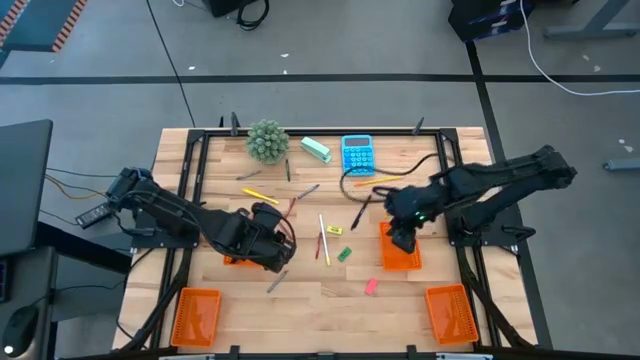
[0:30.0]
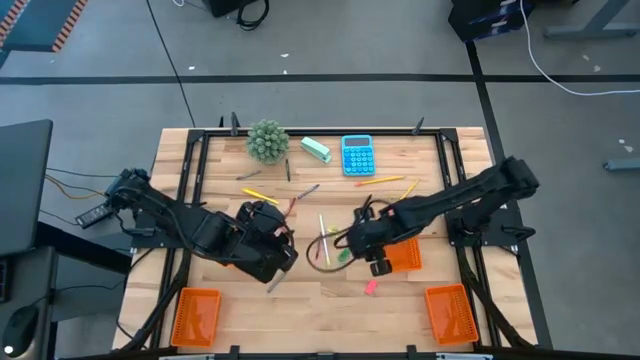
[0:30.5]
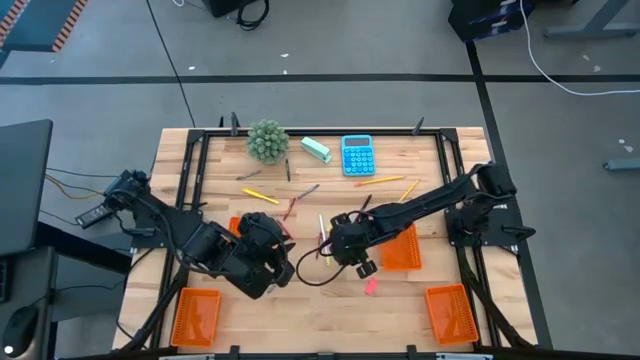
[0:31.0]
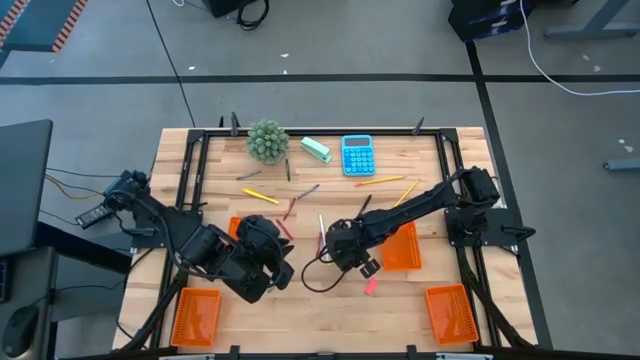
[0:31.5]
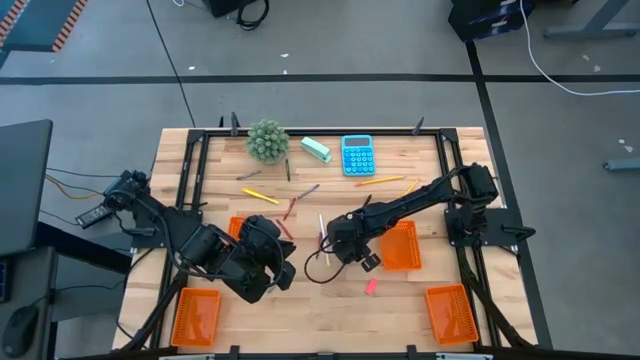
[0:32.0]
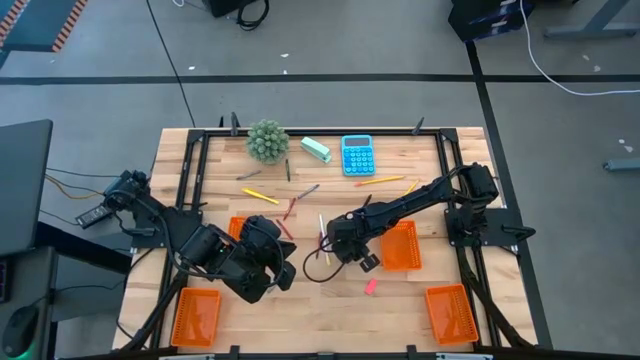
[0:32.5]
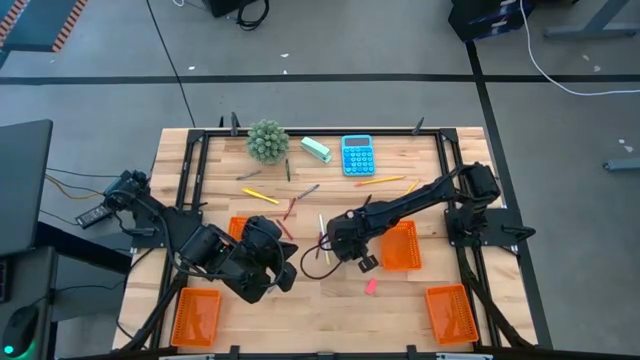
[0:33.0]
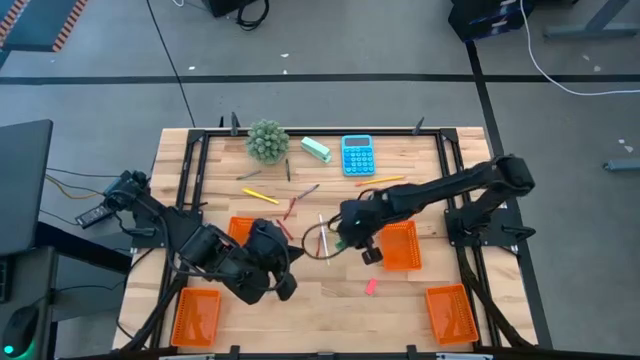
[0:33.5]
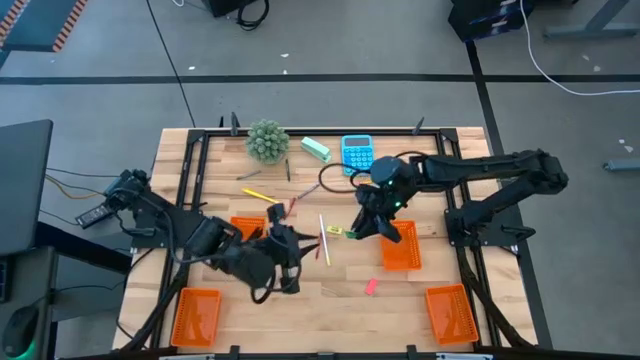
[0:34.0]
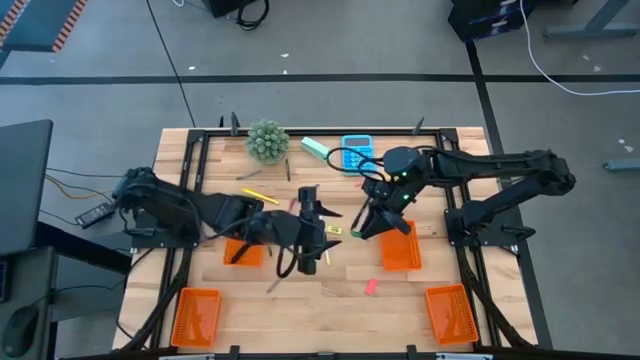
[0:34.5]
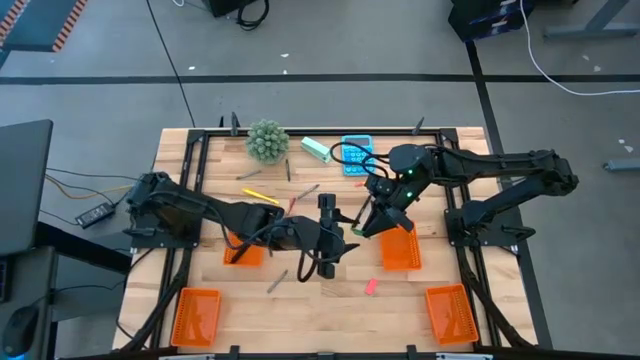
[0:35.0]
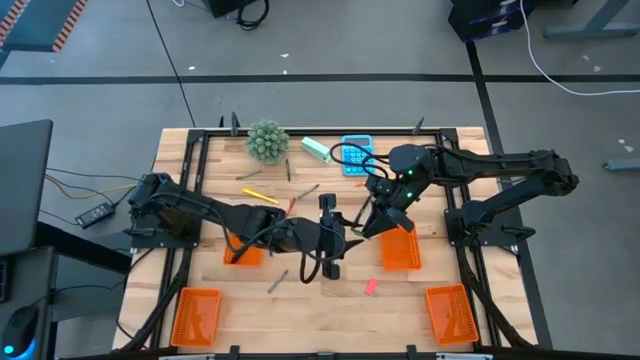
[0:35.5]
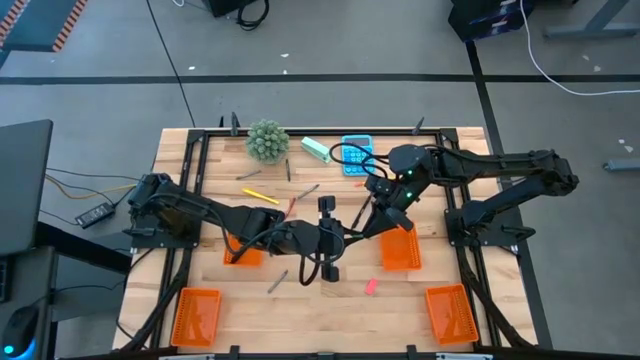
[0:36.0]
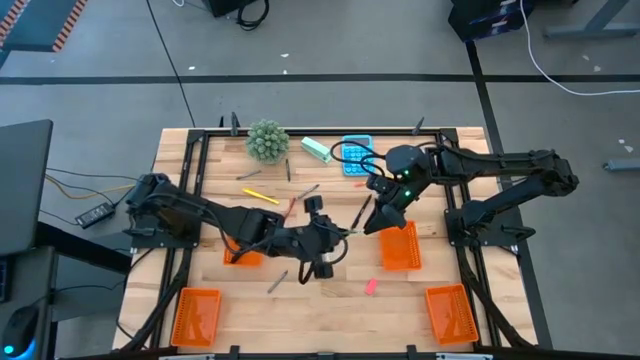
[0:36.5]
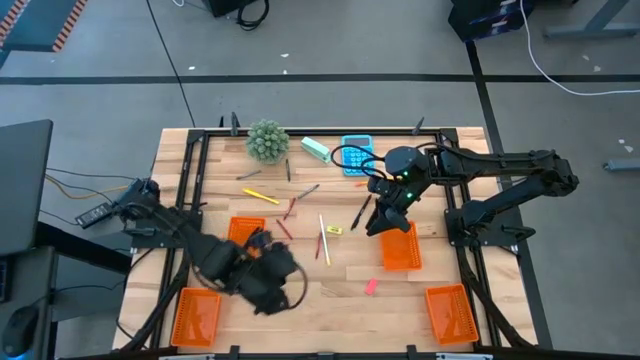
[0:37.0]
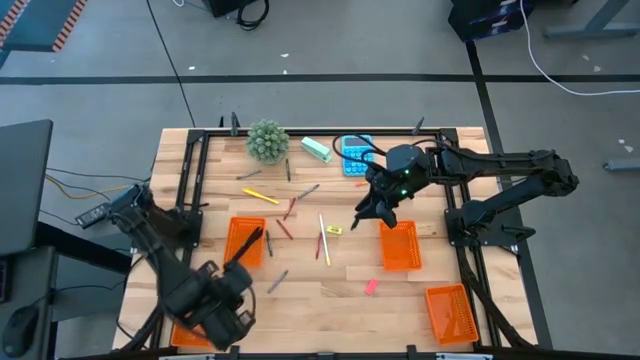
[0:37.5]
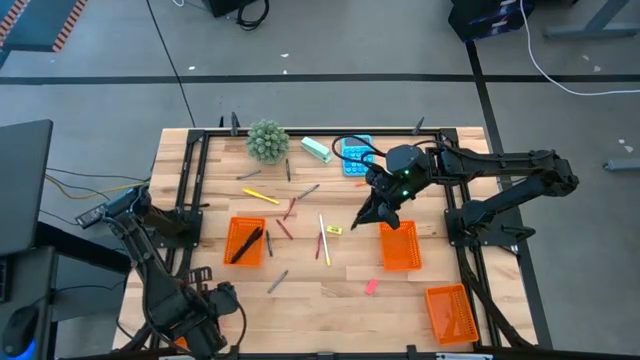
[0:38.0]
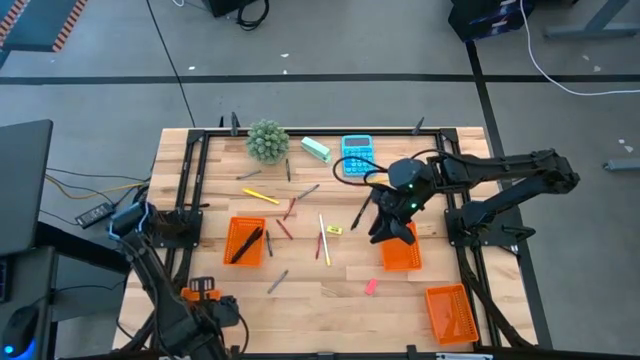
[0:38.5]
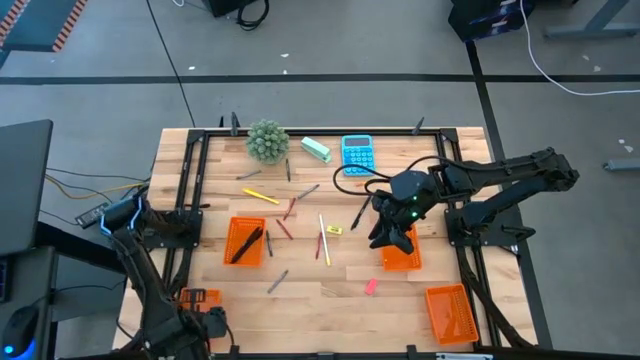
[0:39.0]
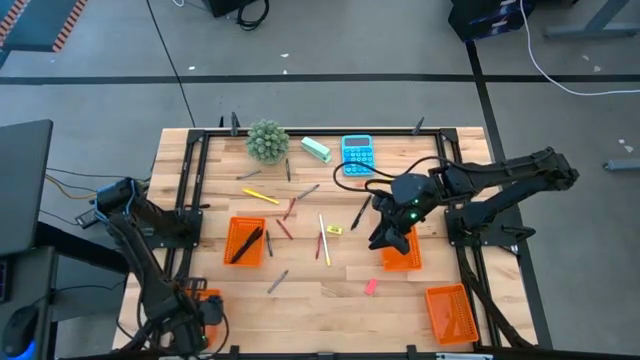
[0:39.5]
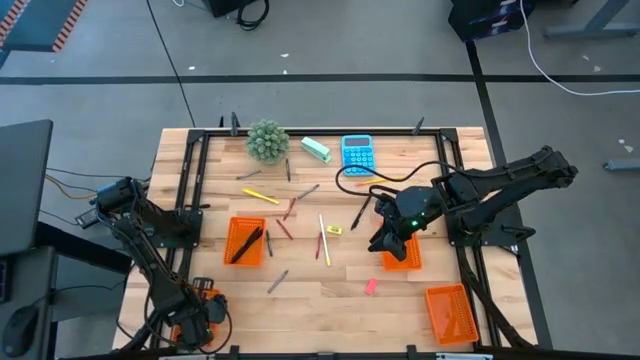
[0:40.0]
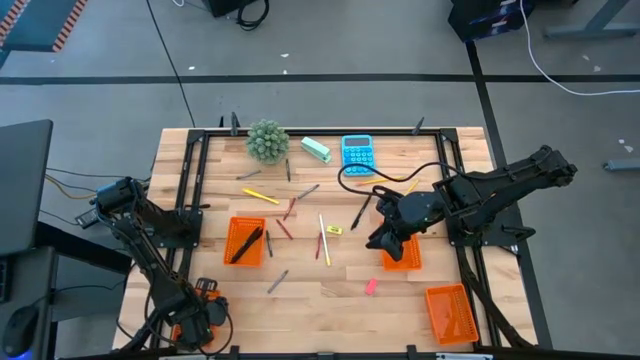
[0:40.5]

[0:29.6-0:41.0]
Task: Sort crayons/erasers/pens/pencils in bins
Put the green eraser into the bottom left orange basket

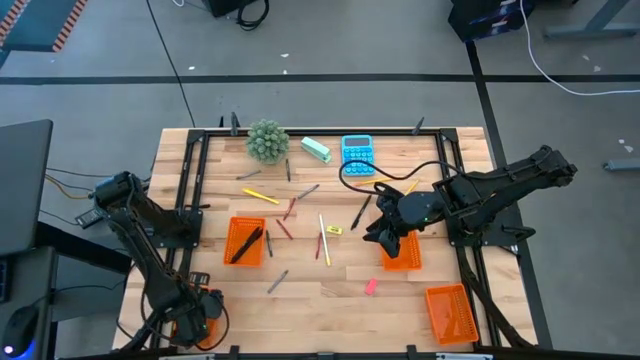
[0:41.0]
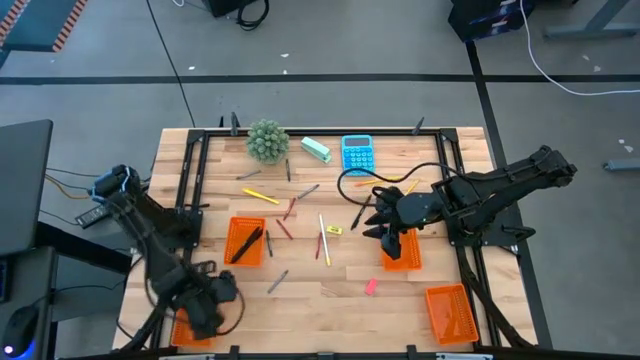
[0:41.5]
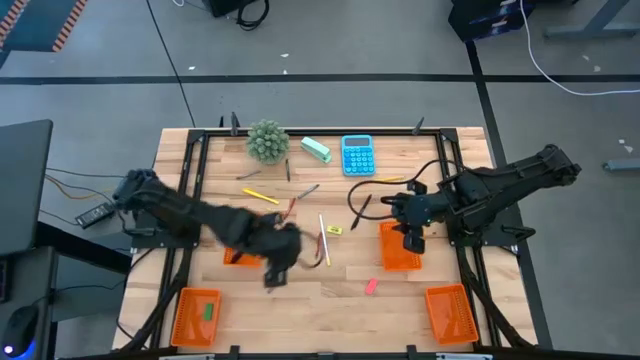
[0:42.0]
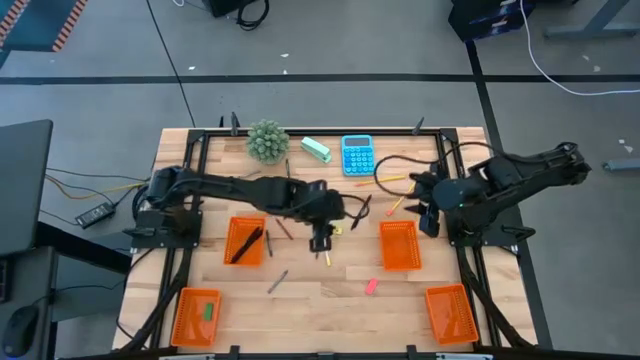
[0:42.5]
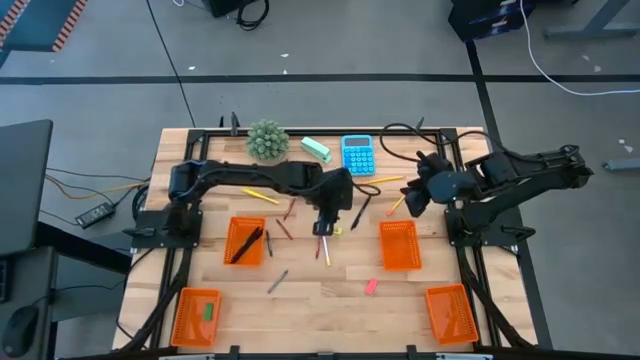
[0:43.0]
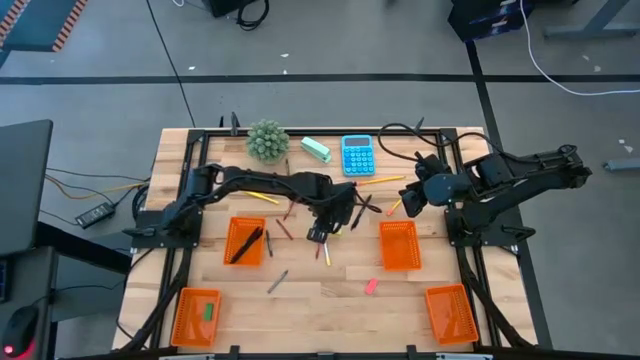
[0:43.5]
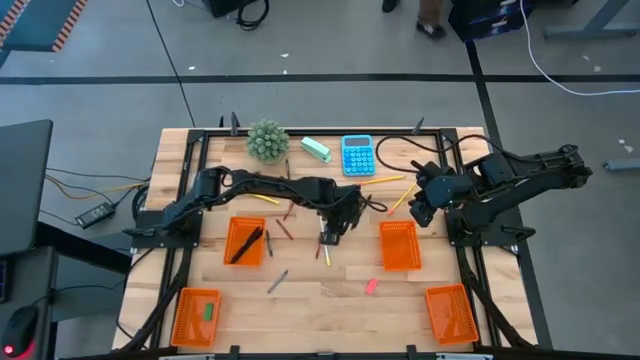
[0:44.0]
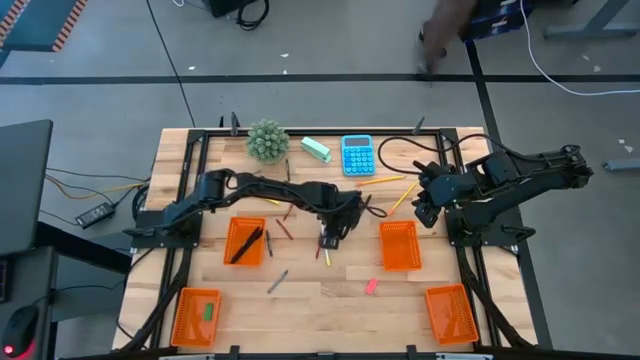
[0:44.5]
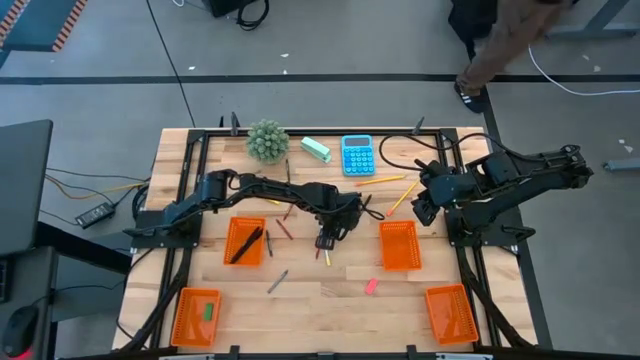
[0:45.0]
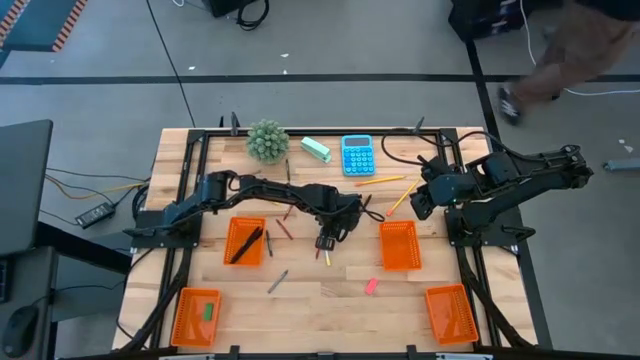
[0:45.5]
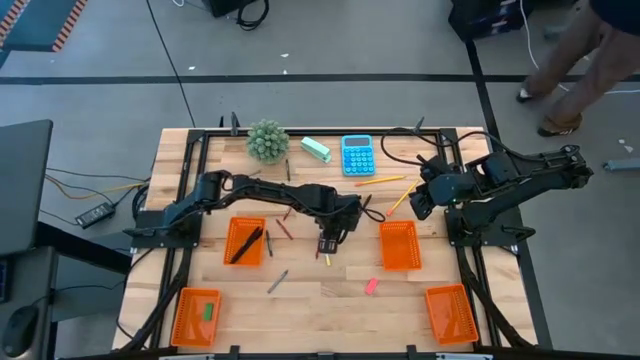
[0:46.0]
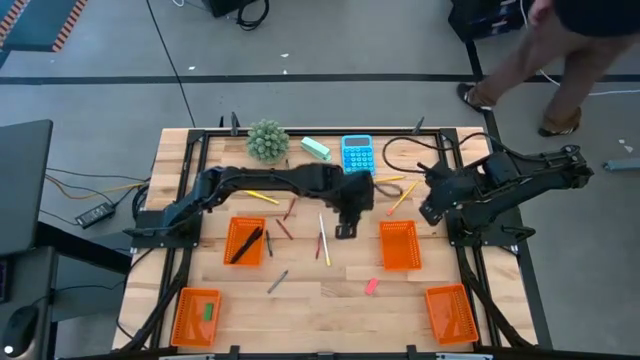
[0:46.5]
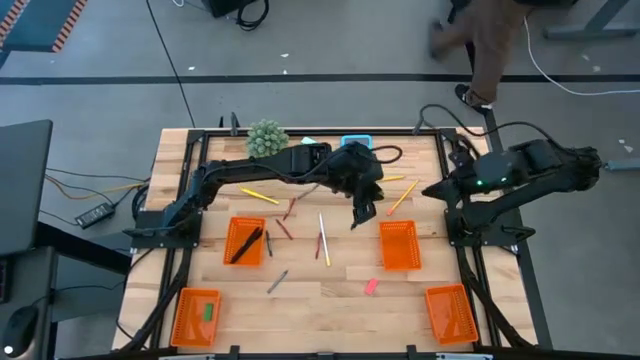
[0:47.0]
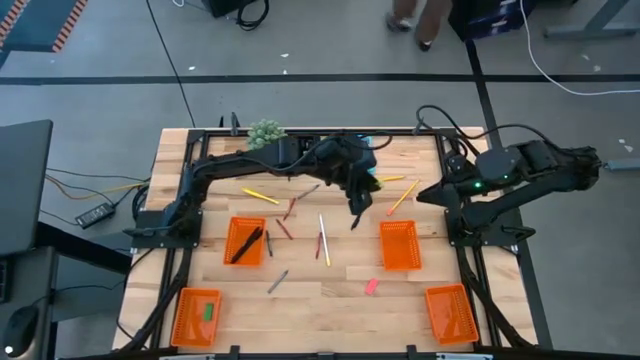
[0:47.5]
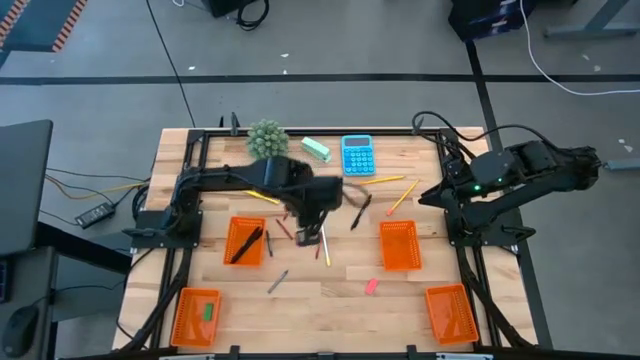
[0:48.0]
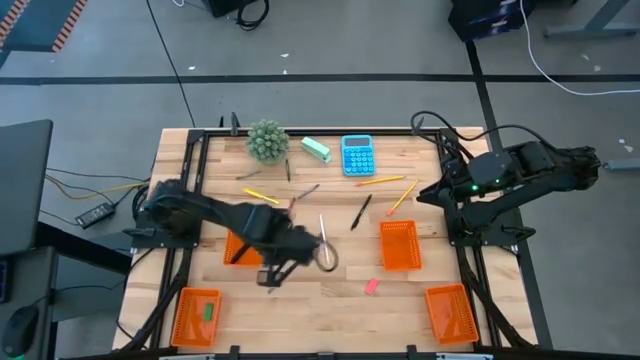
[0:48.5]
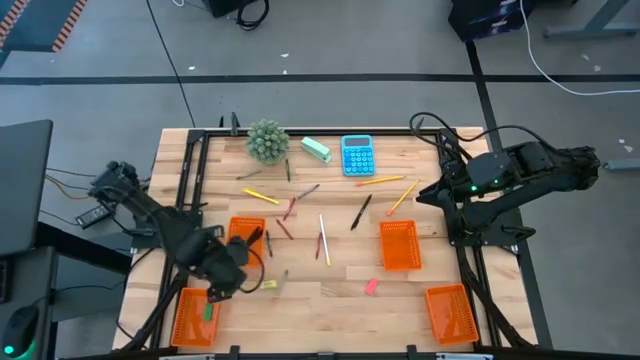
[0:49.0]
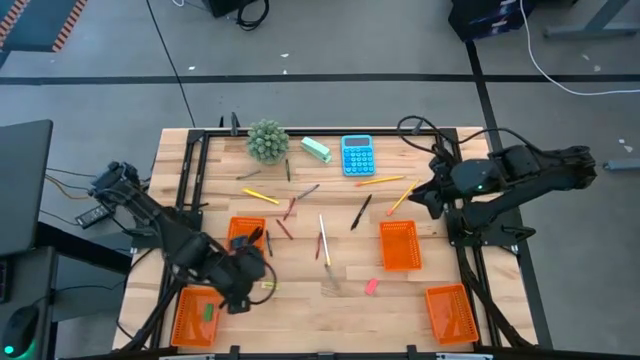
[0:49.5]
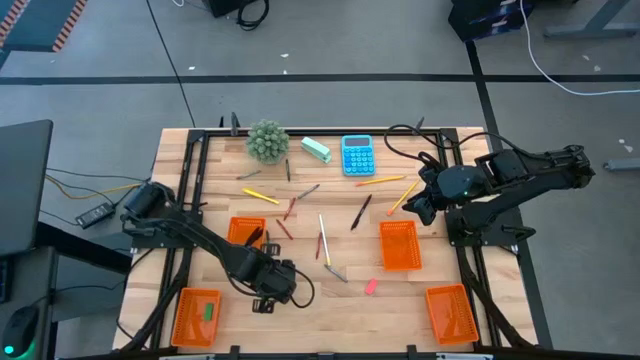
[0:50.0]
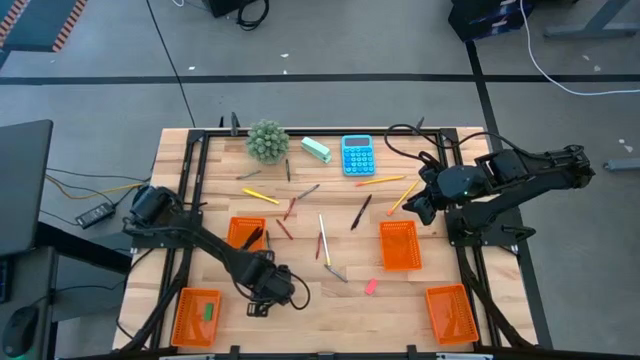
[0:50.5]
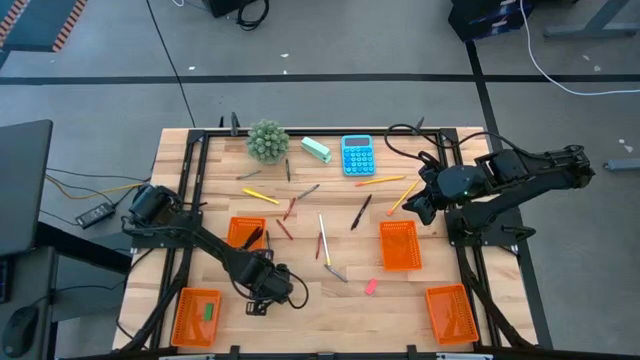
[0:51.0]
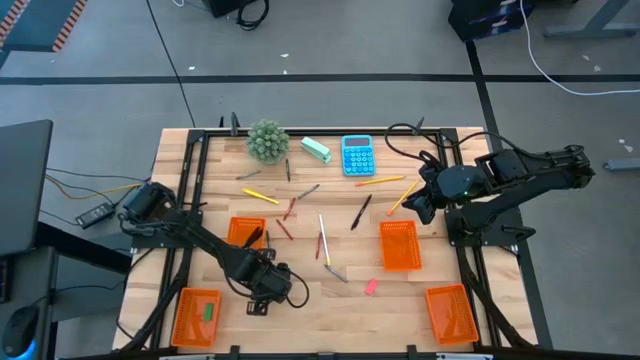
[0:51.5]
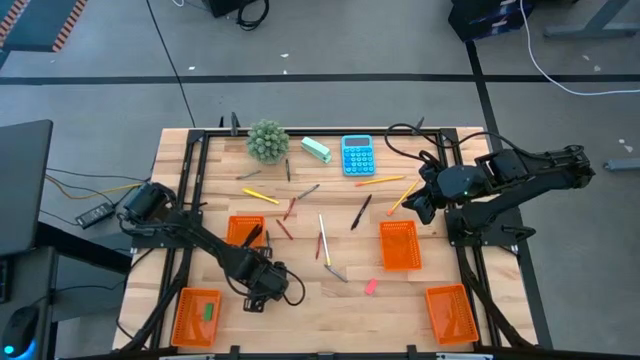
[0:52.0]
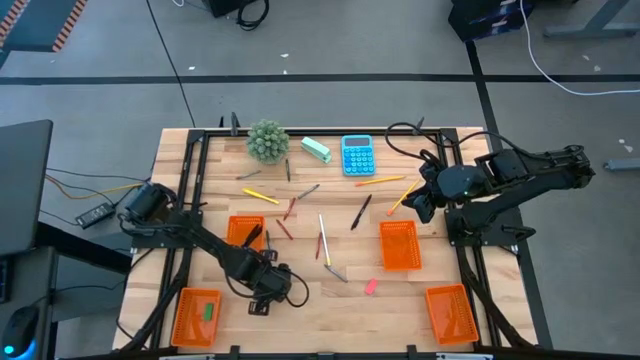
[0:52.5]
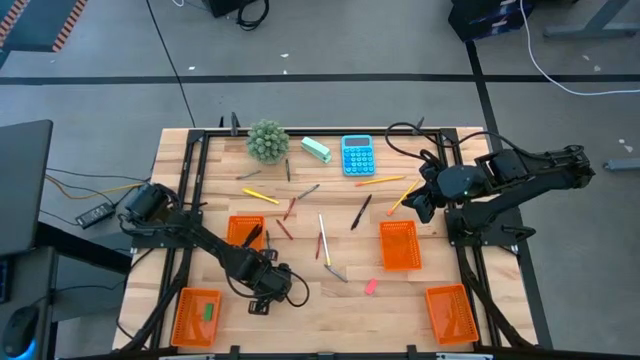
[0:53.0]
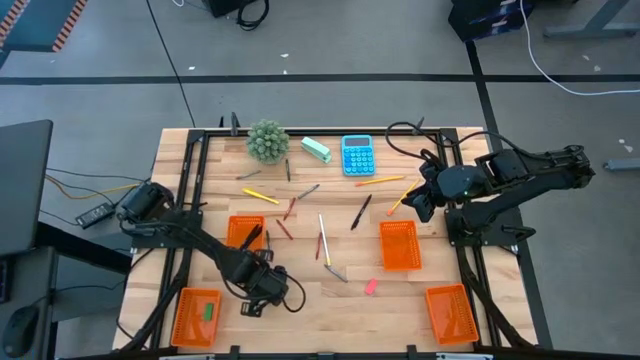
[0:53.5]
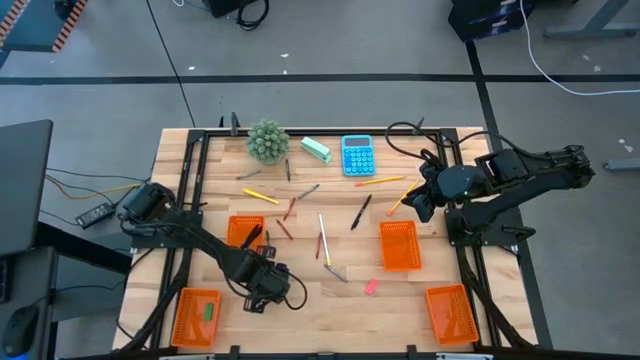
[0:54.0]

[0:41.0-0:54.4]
Put the yellow eraser into the bottom left orange basket
